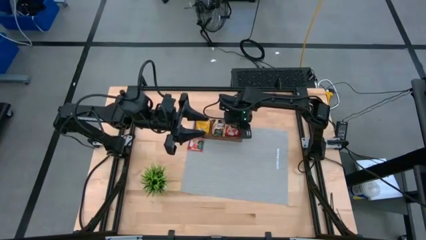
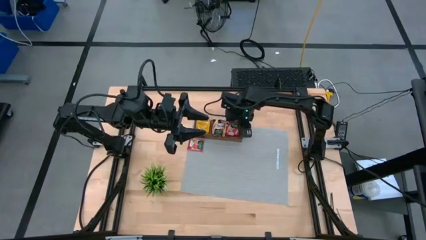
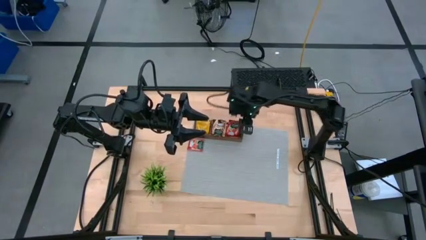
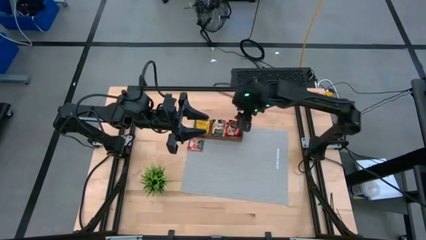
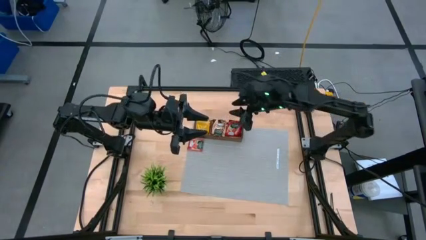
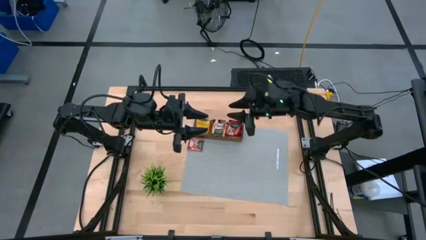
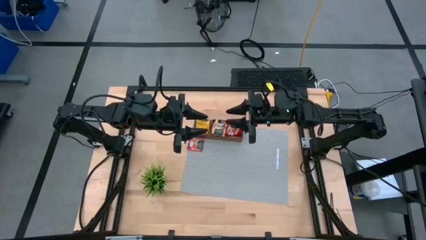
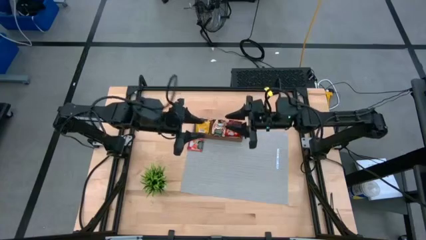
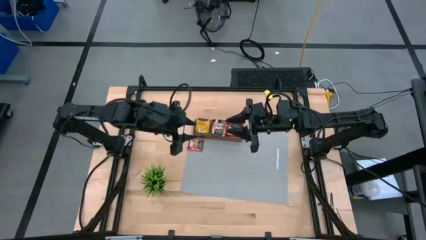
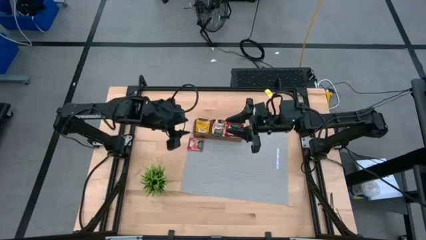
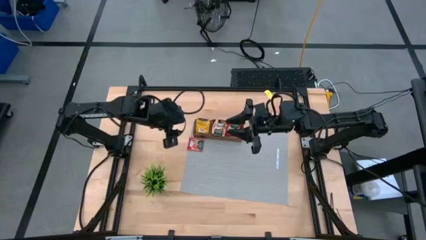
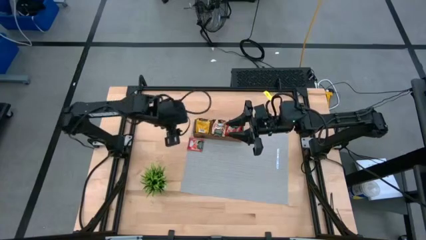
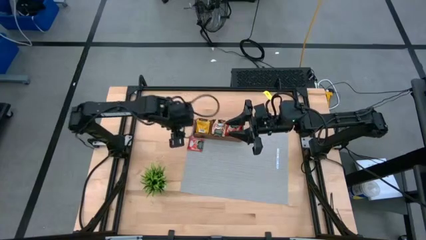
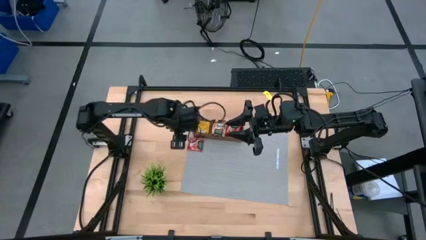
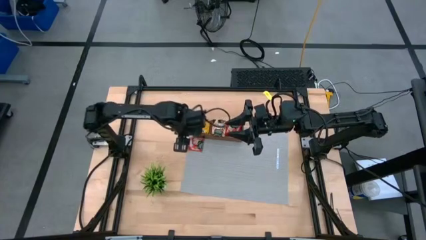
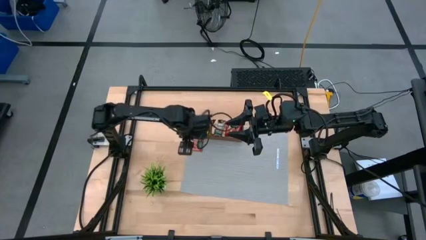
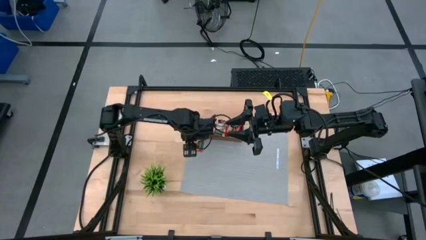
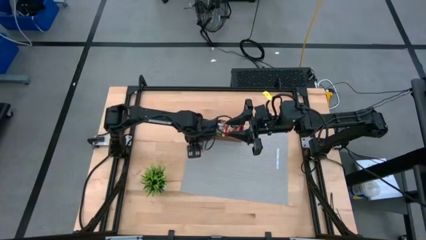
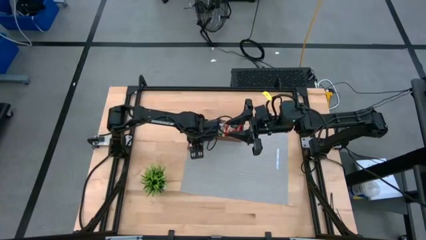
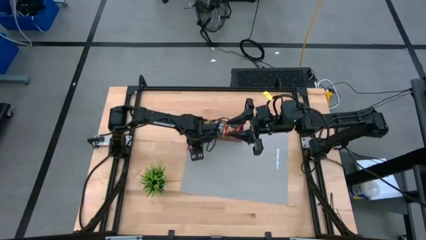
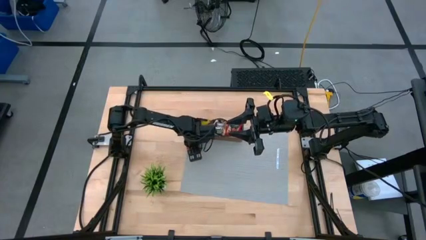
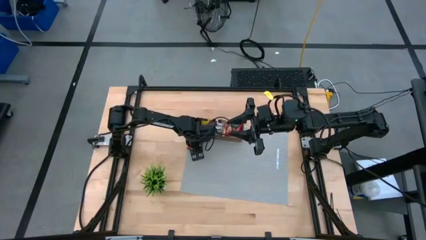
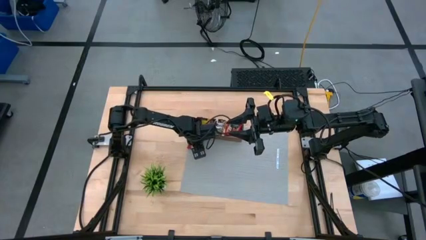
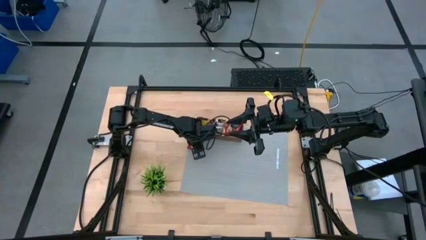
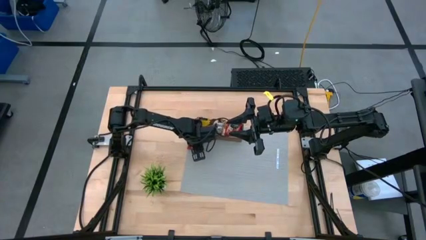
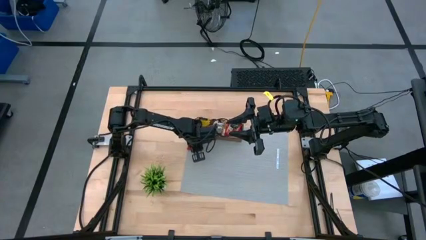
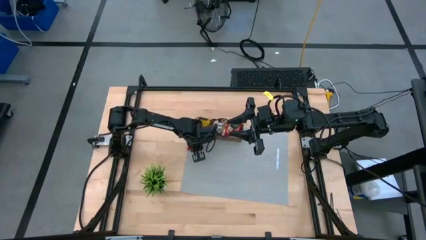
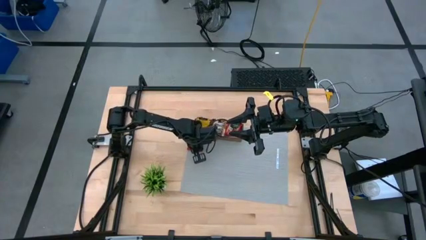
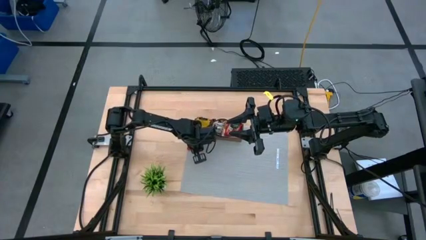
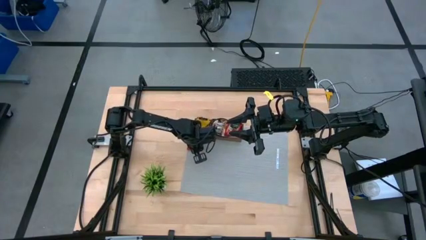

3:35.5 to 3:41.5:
Task: Pick & Place Tea
Put the red tea bag into the right section of the wooden organizer

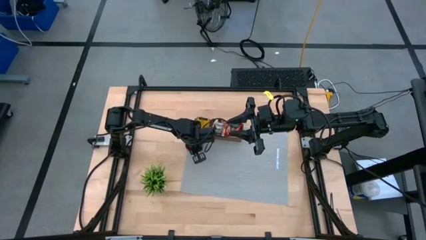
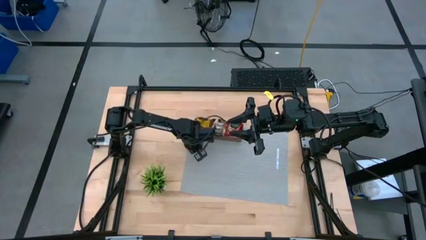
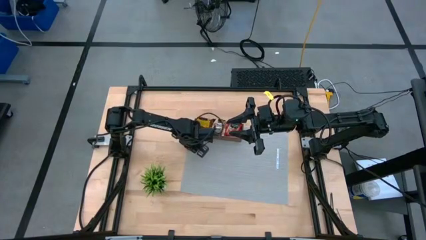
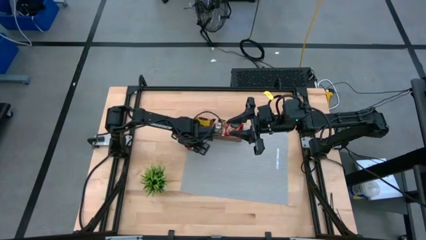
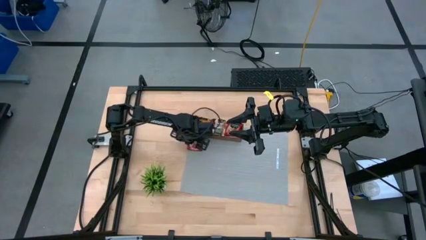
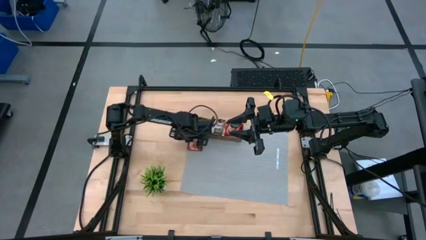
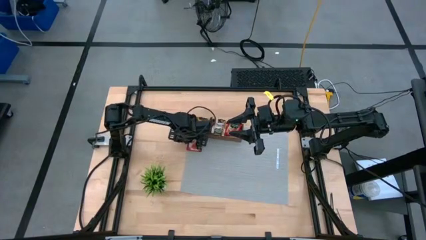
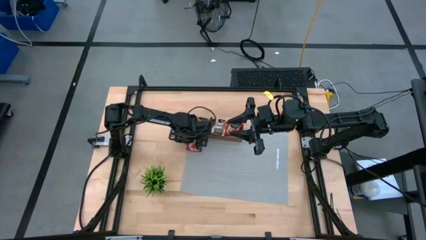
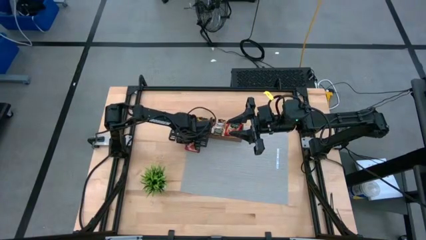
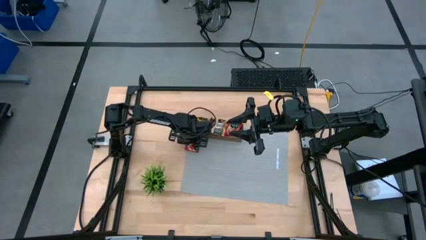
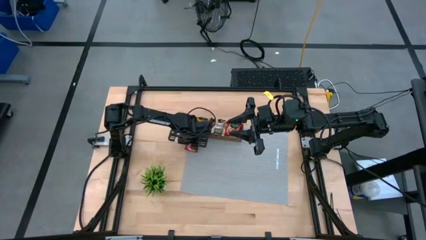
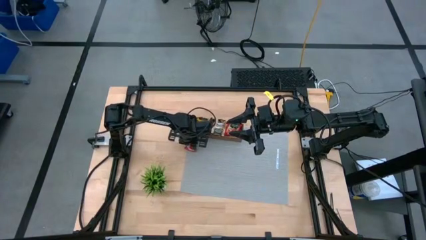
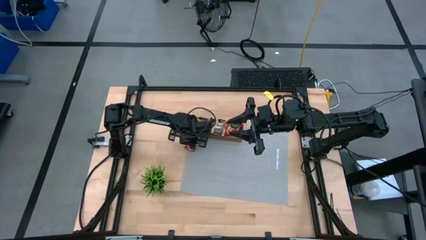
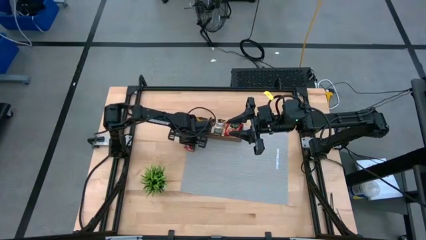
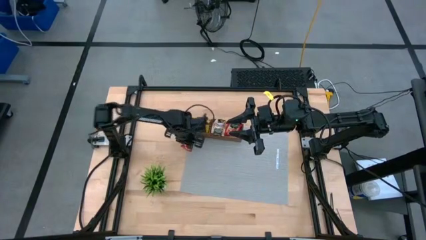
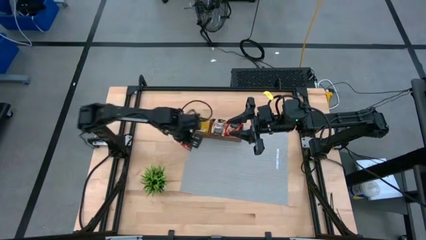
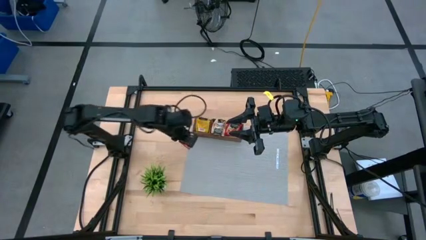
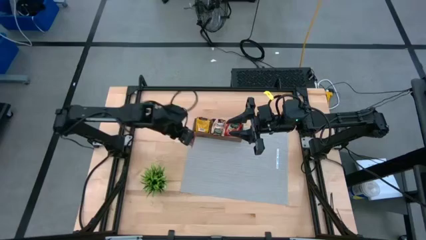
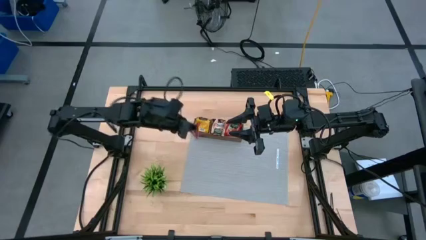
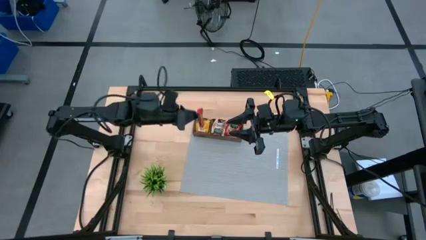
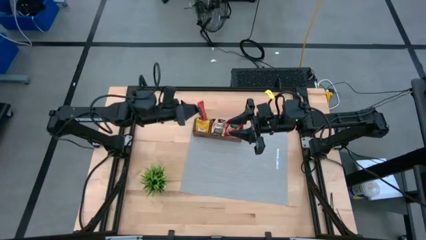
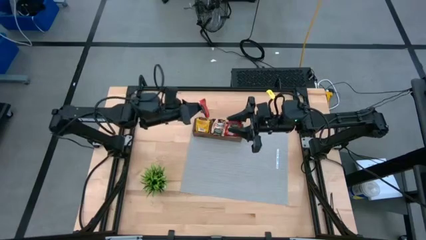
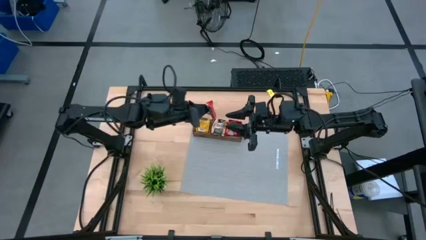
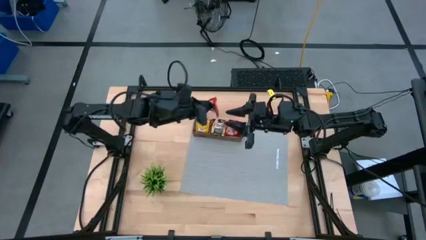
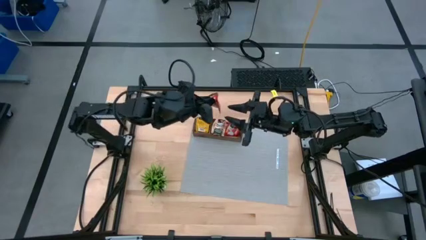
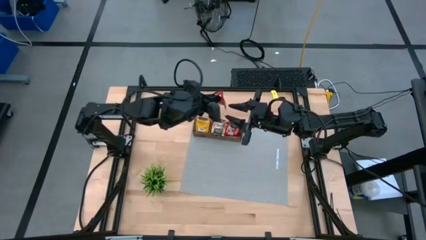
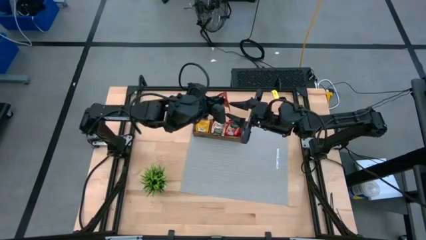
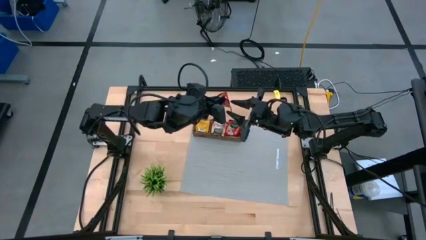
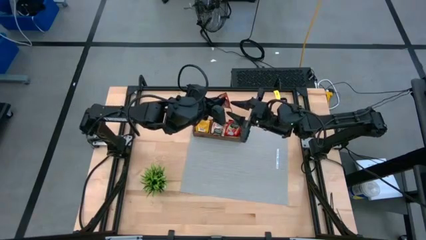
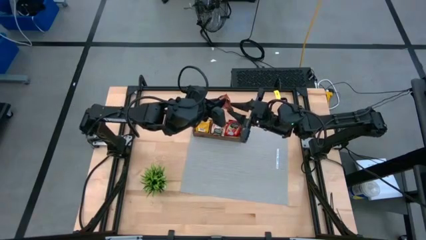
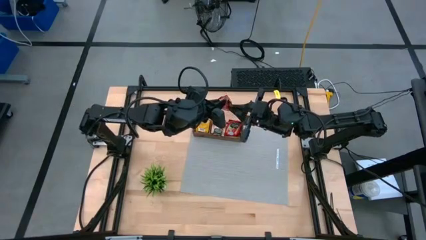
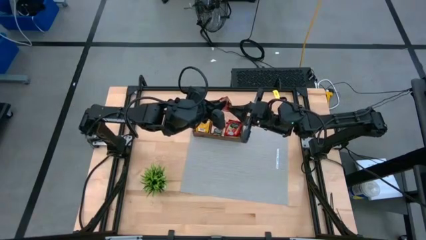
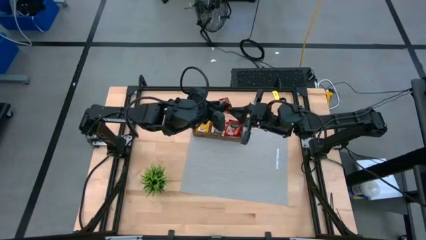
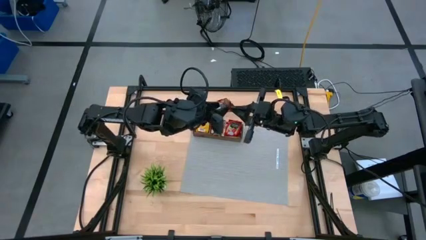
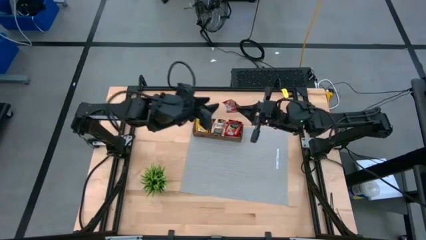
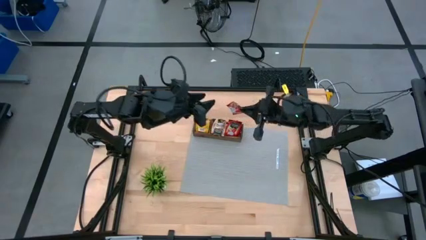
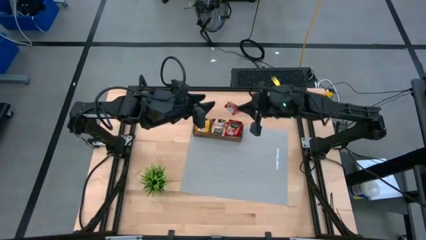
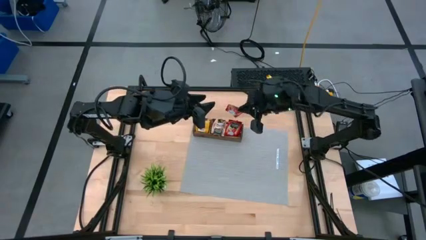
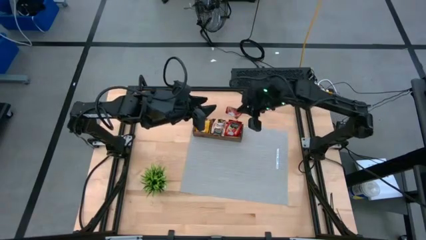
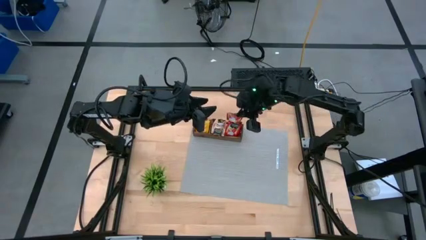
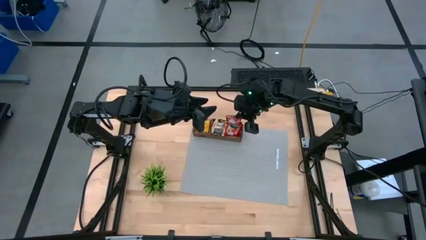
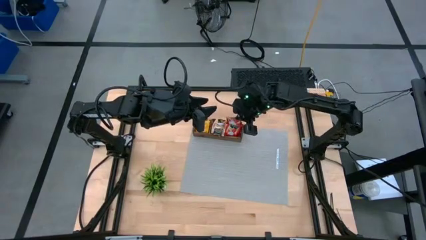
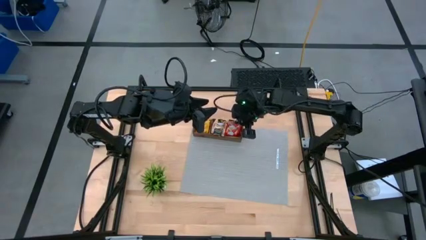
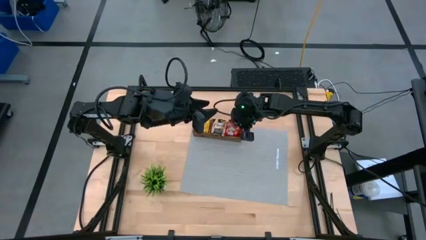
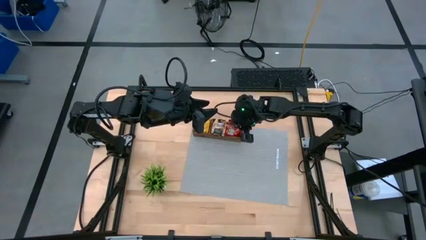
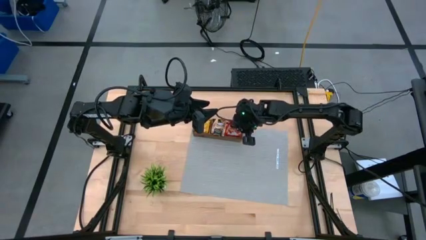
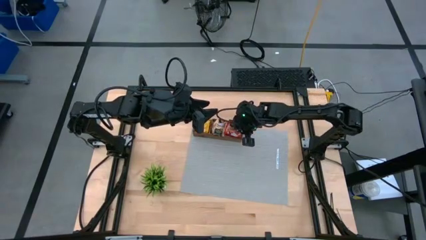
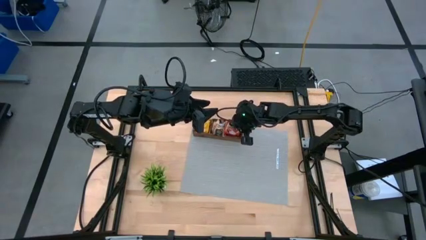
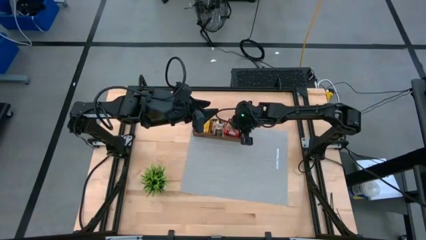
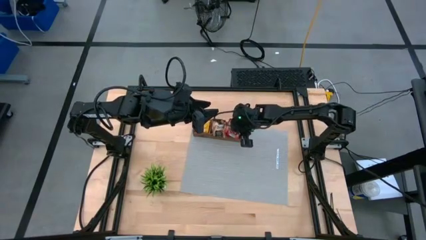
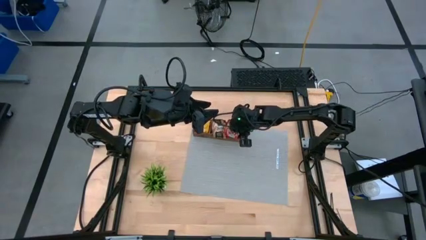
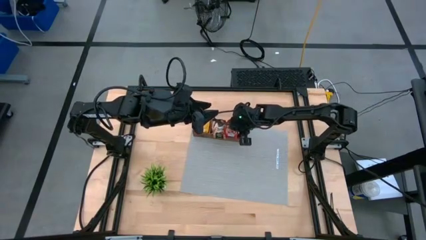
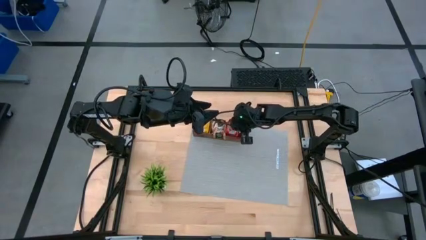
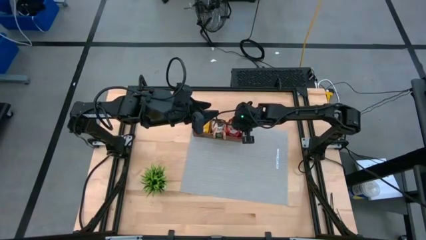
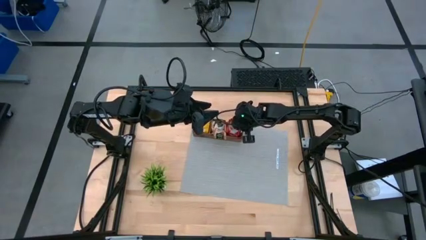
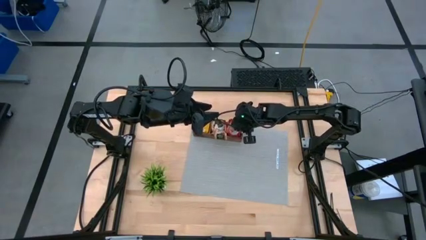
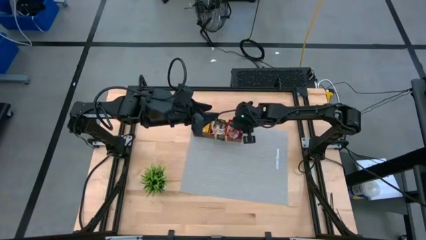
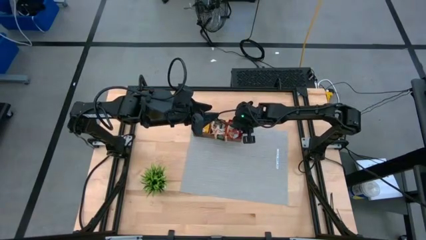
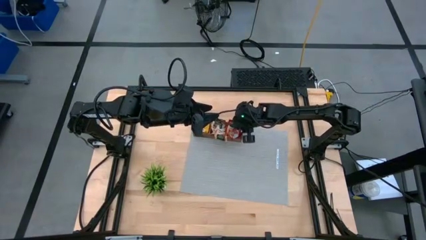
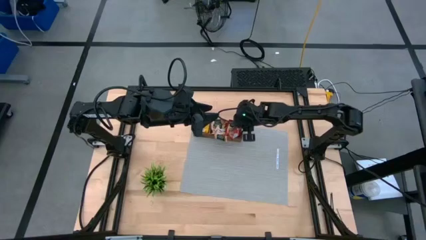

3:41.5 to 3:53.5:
Put the red tea bag into the right section of the wooden organizer
